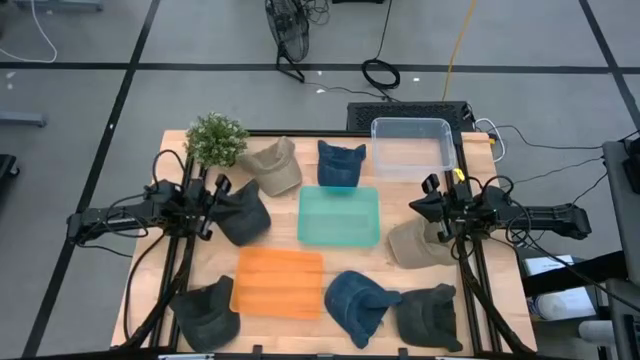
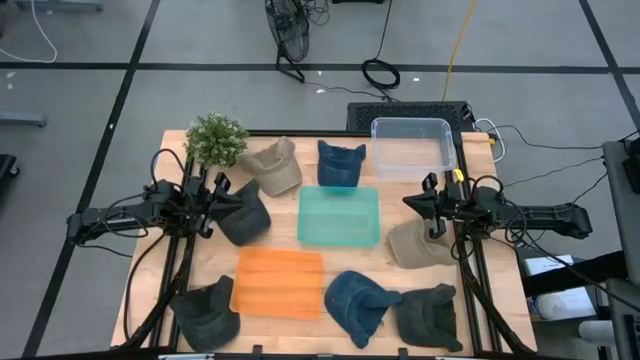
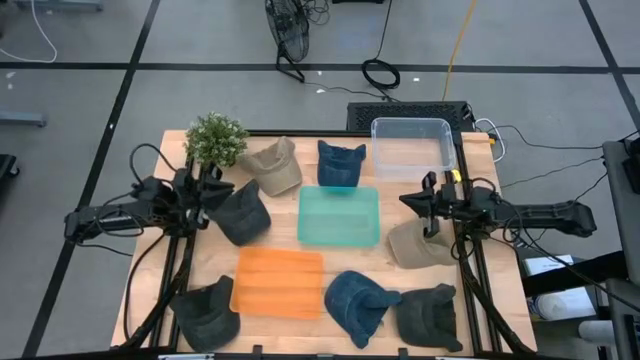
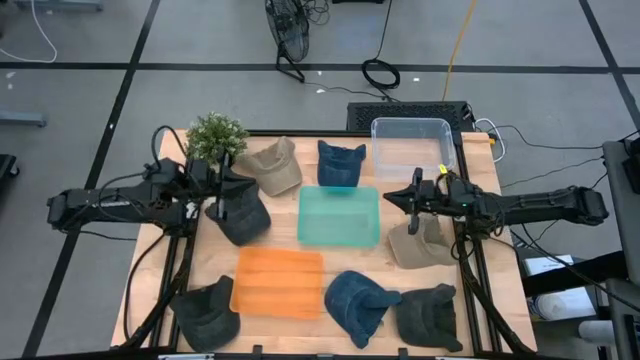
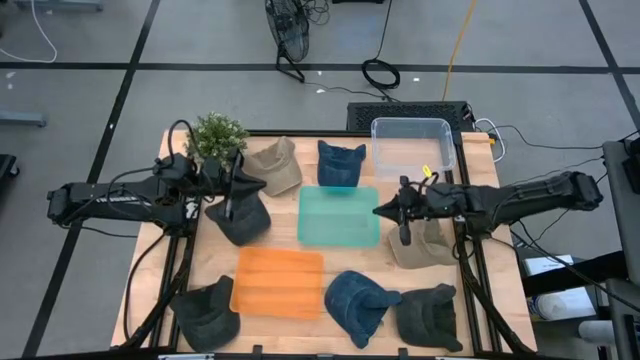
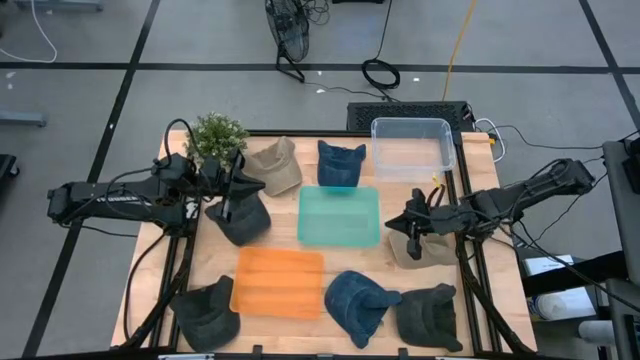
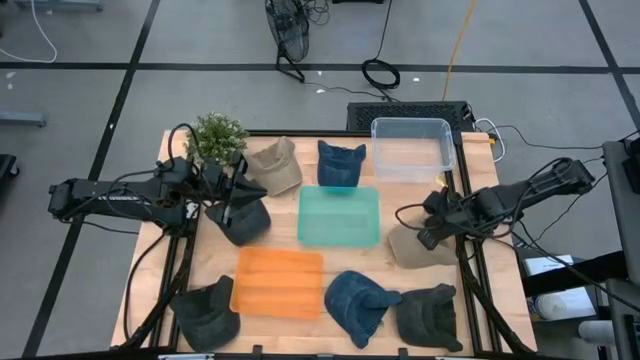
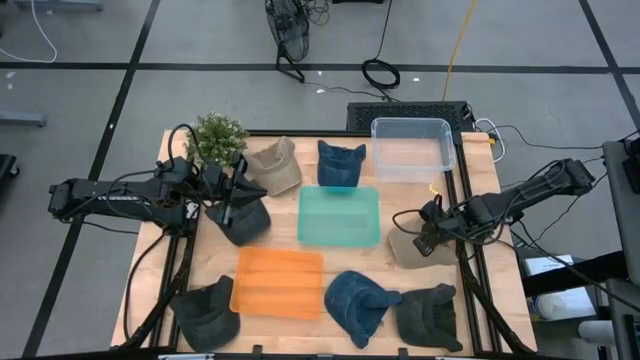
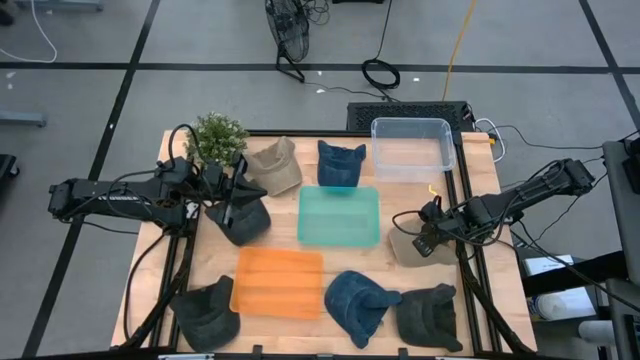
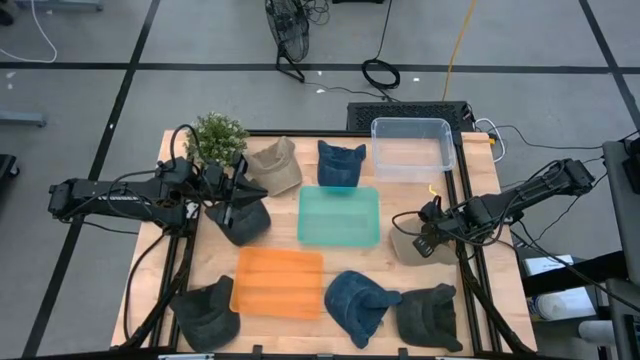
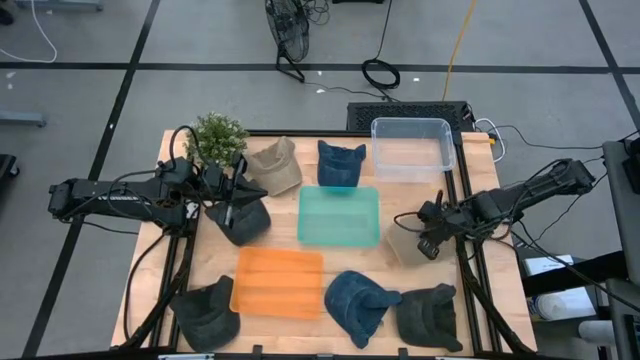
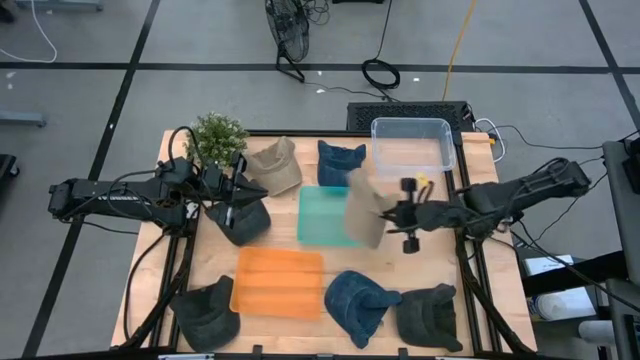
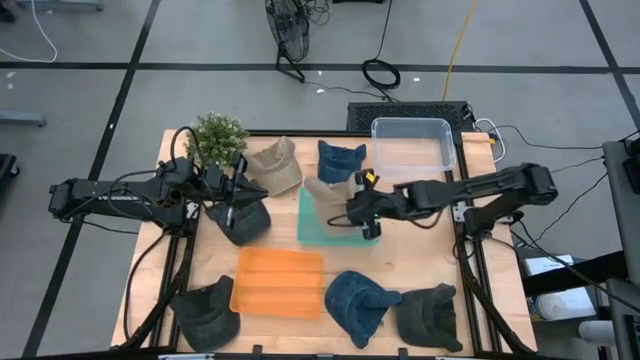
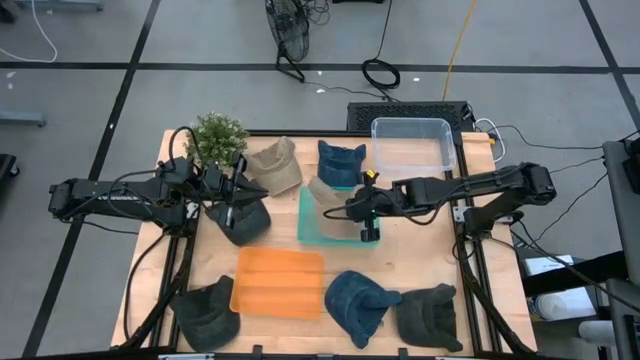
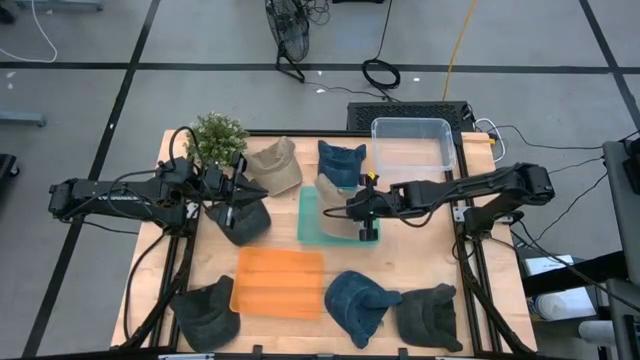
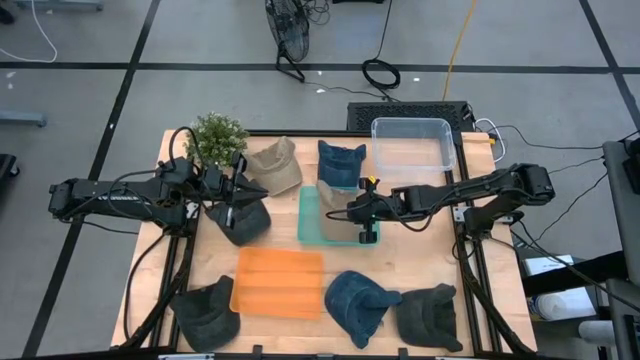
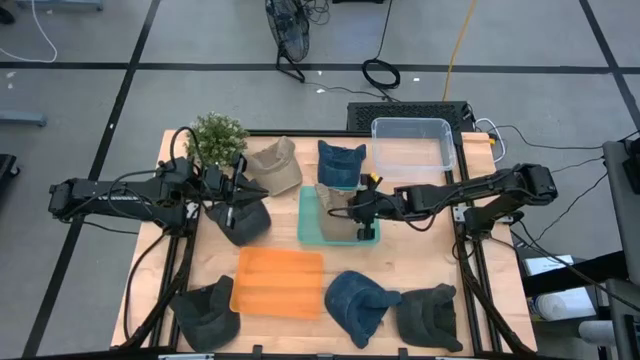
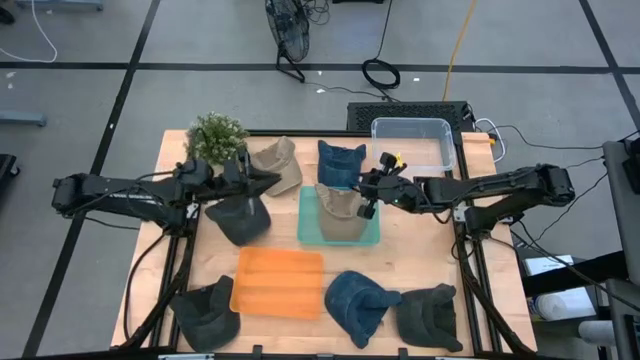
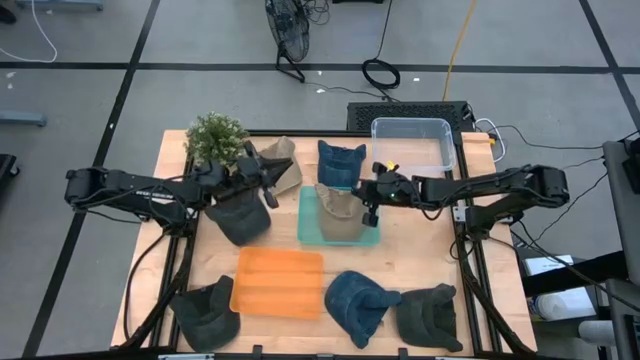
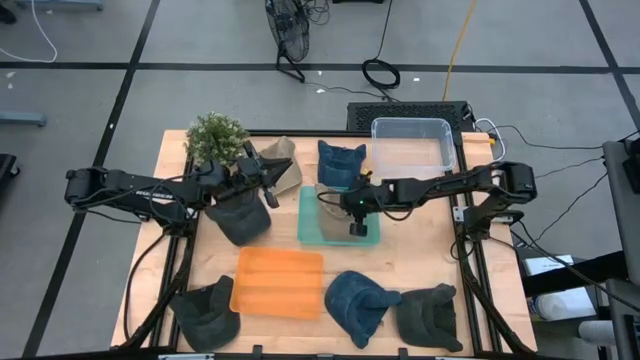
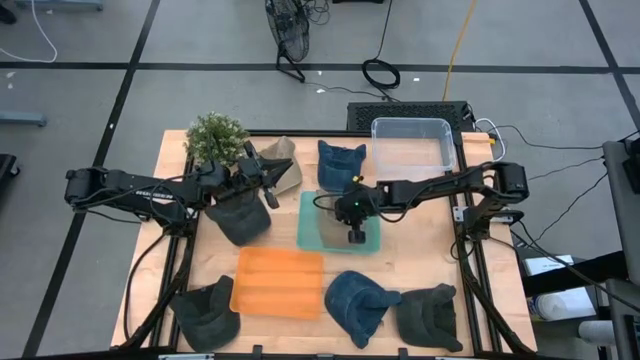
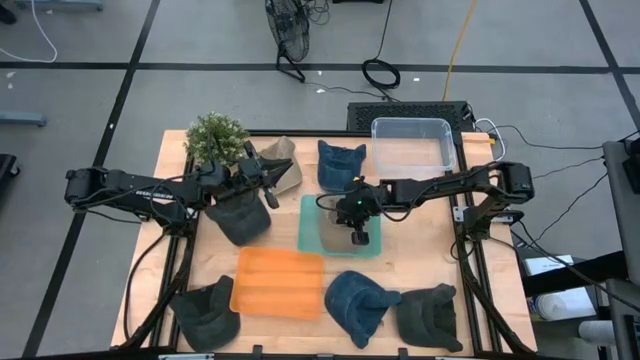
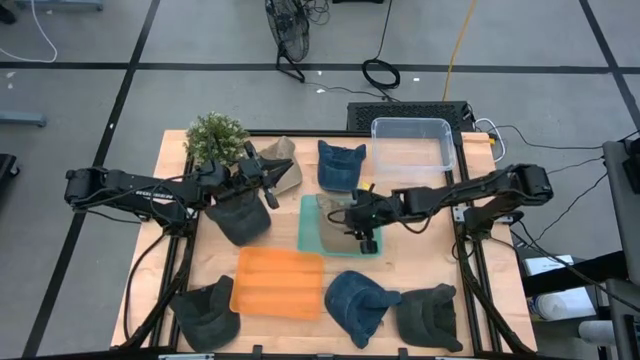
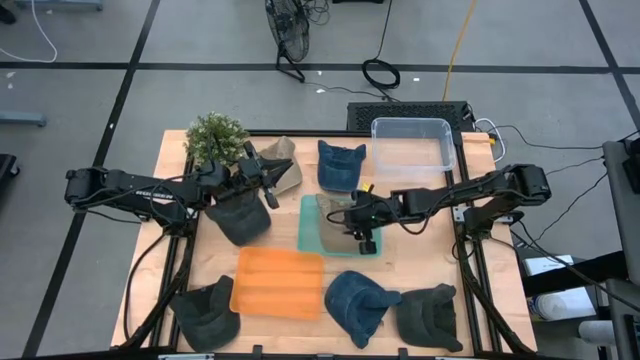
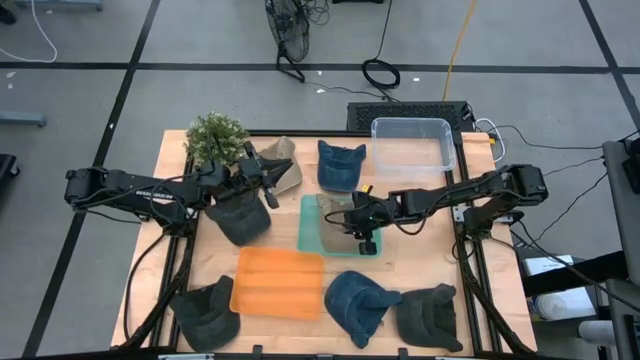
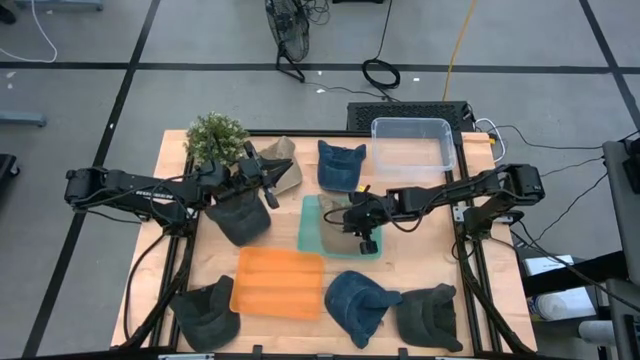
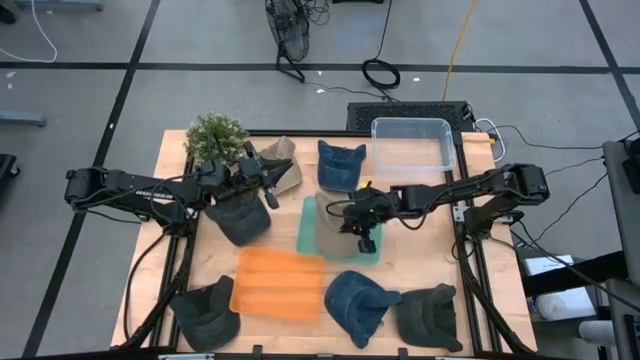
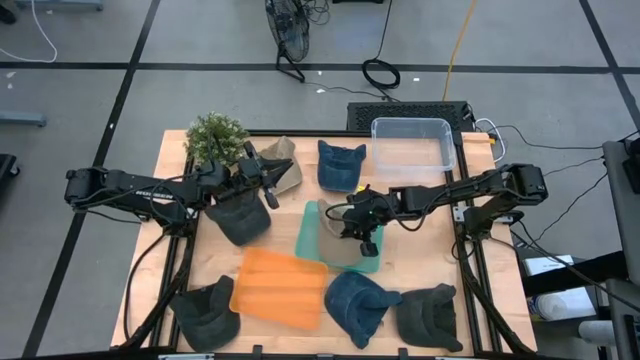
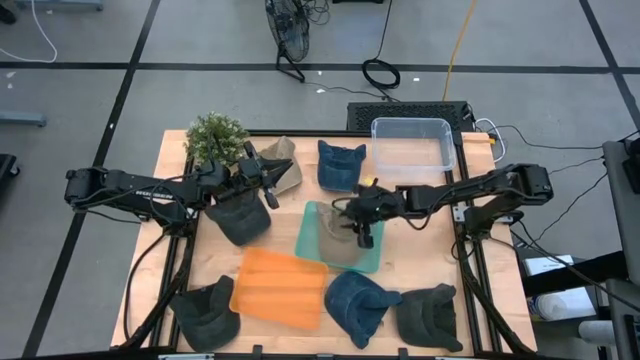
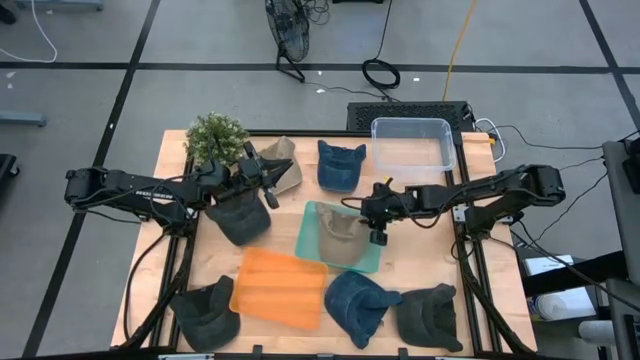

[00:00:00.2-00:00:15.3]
Task: Pick & Place hat
Put the bottom brown cap into the blue bin

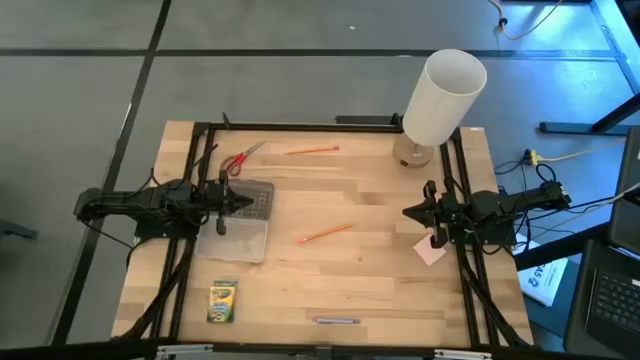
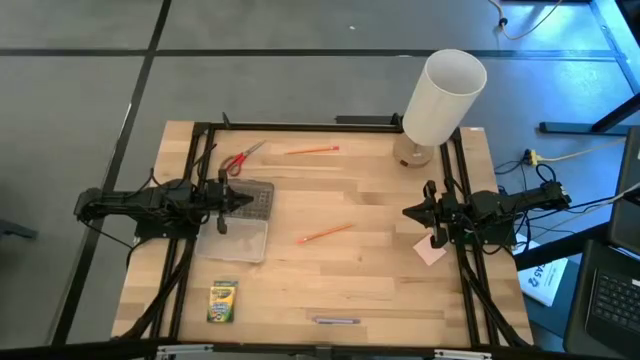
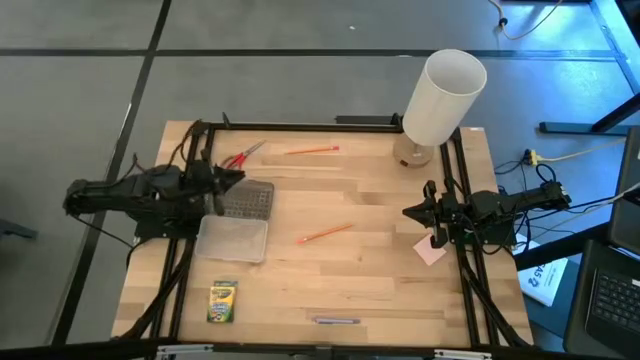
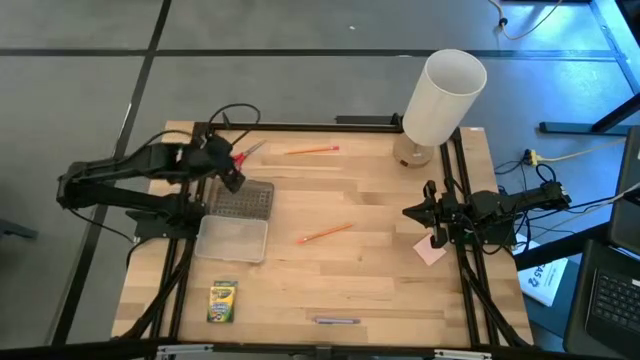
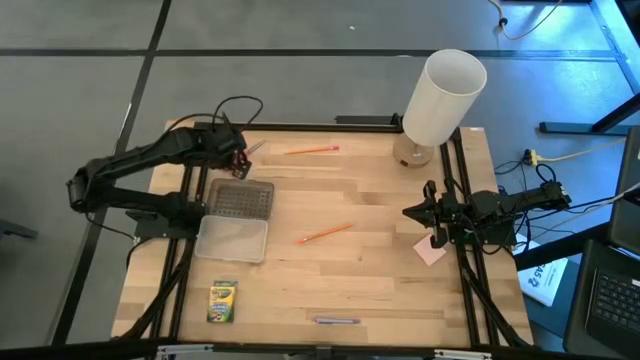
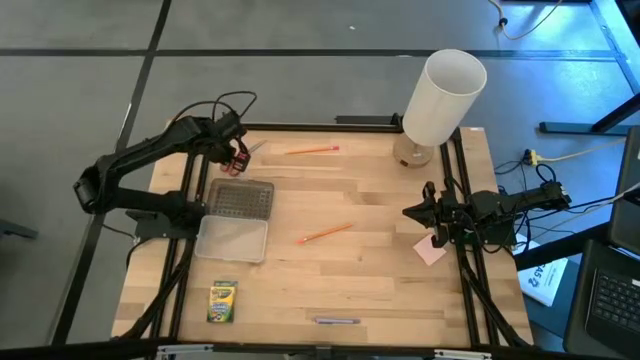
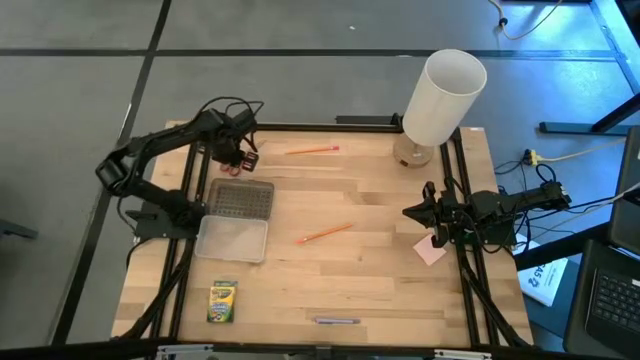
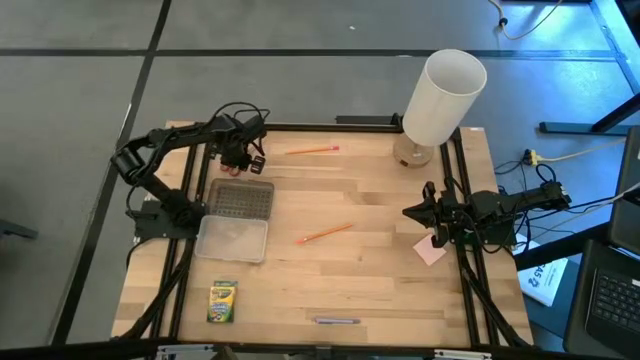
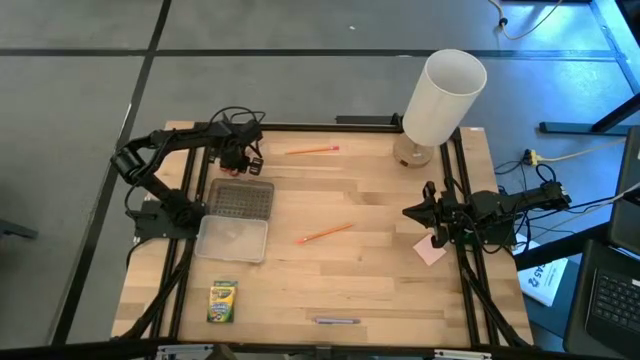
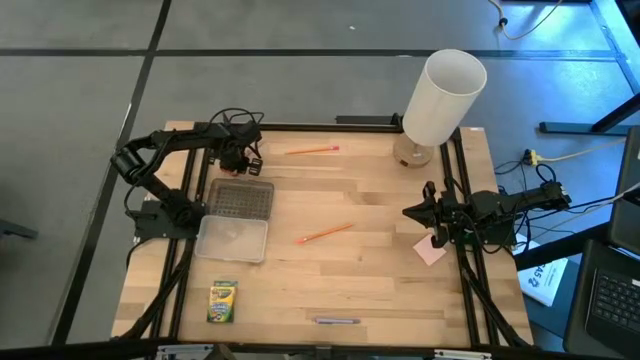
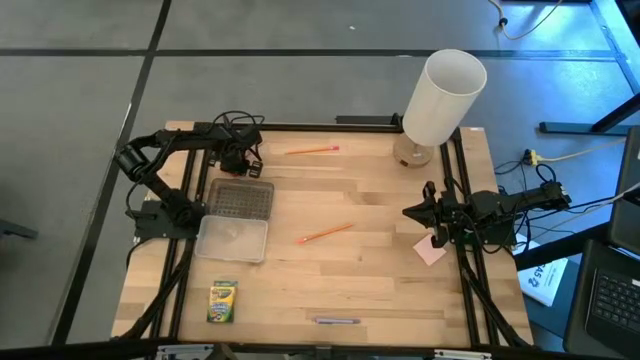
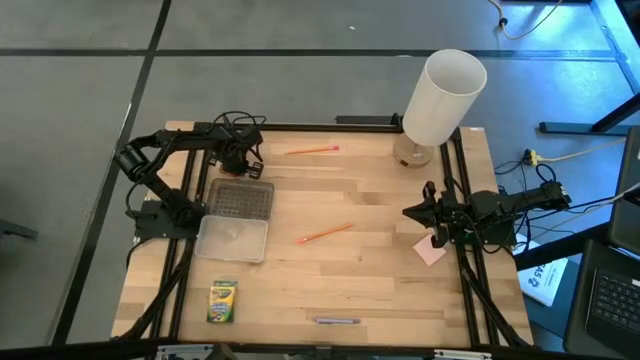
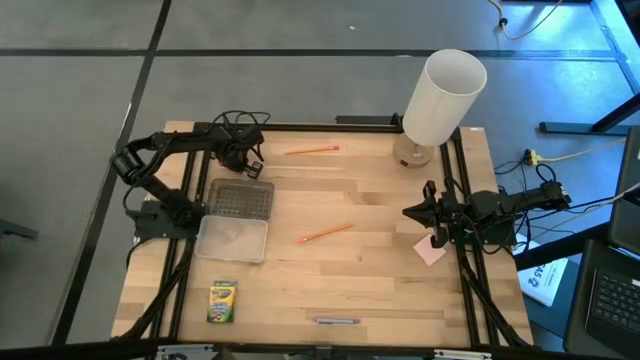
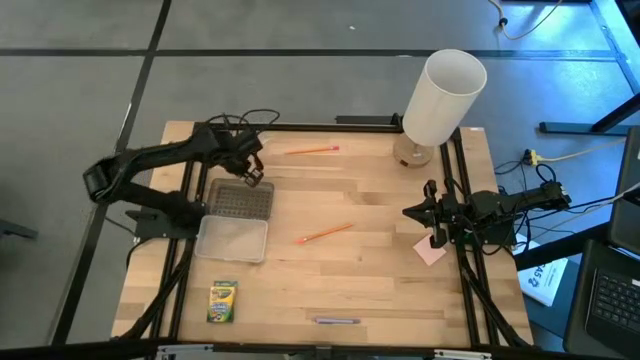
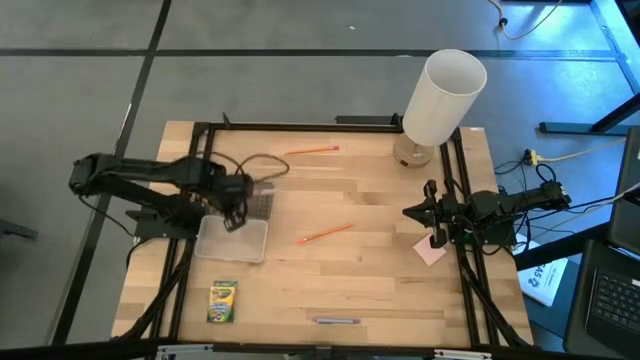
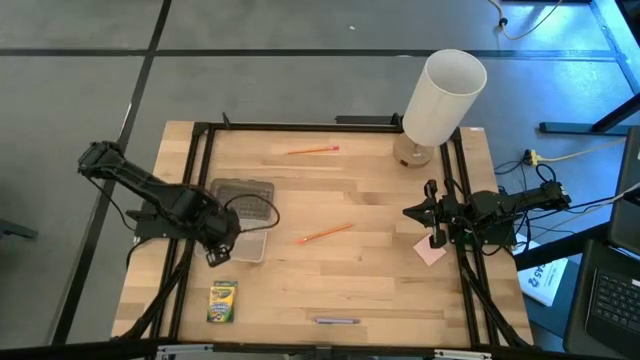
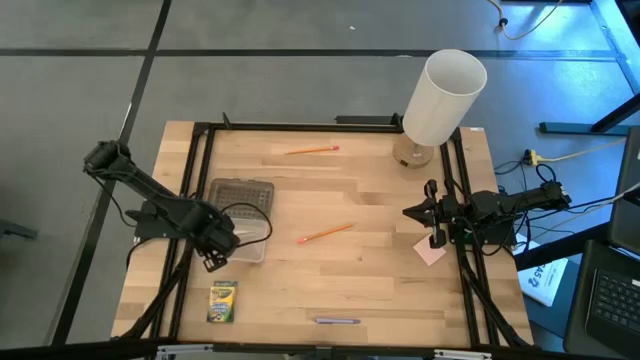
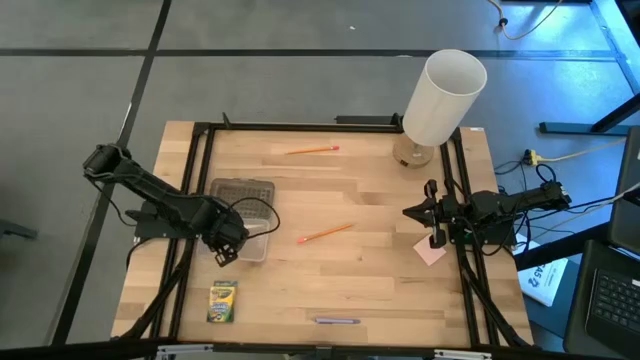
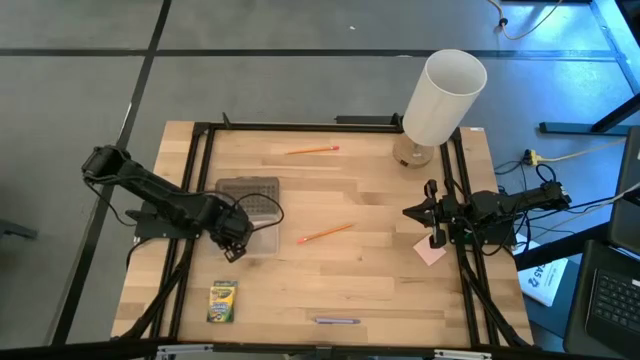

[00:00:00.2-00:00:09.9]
Task: Pack school essentials
Put the red scissors into the transparent supply box
